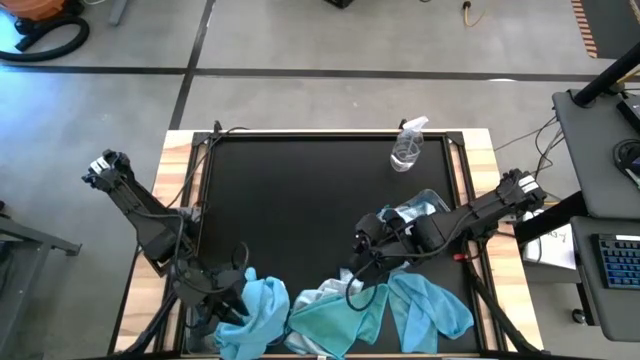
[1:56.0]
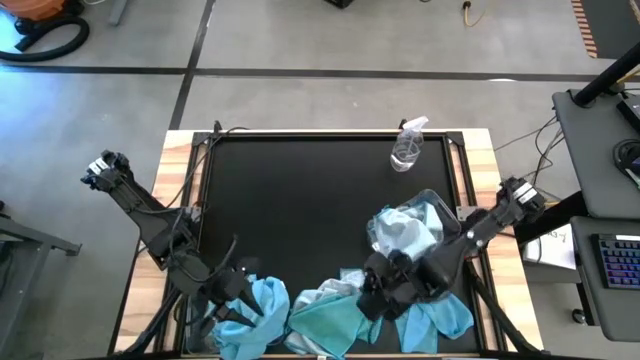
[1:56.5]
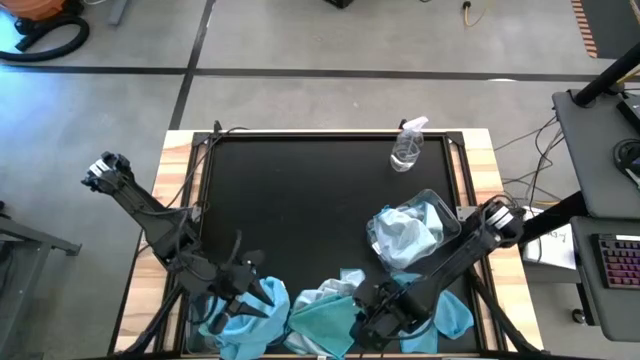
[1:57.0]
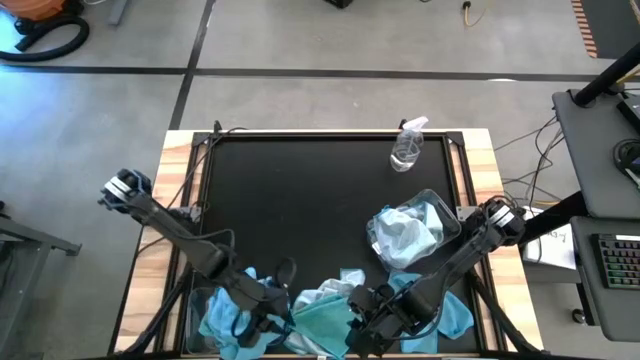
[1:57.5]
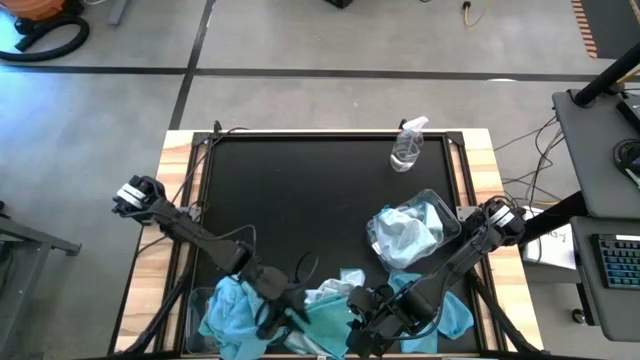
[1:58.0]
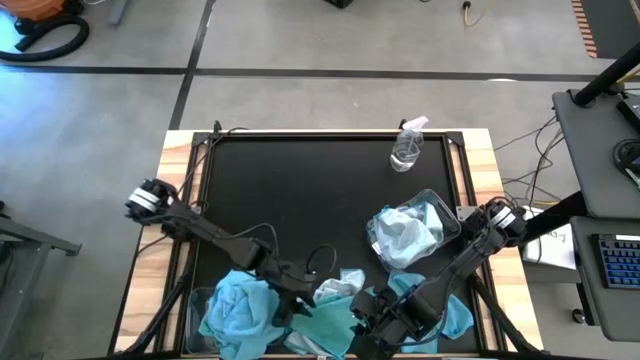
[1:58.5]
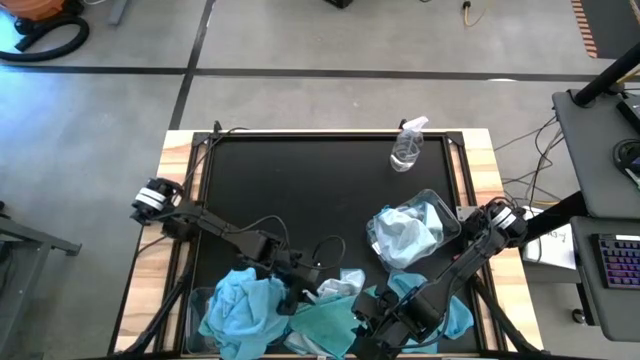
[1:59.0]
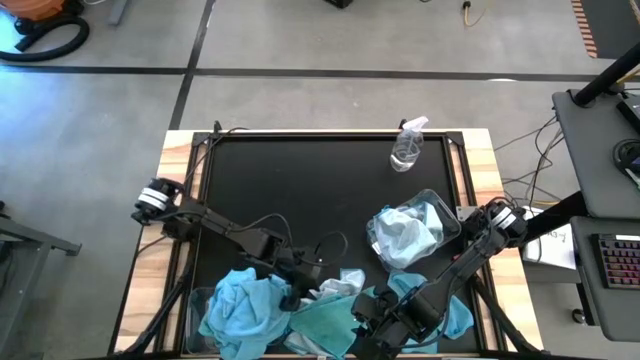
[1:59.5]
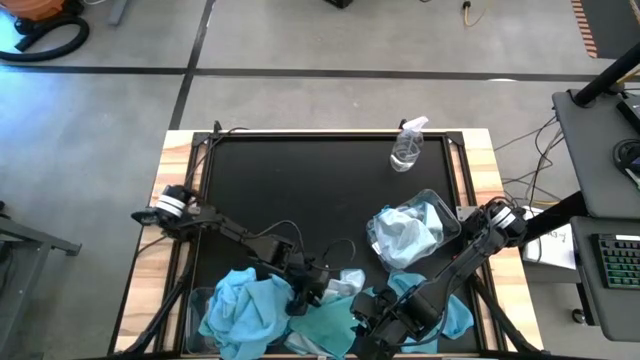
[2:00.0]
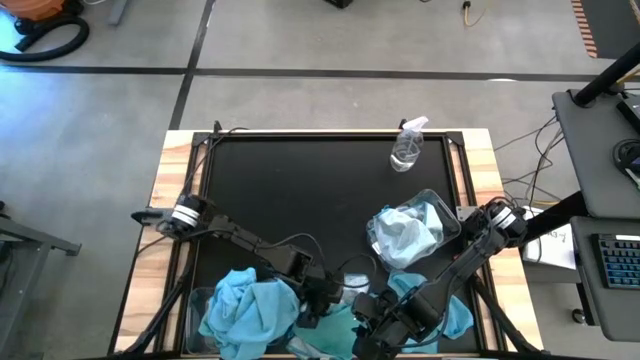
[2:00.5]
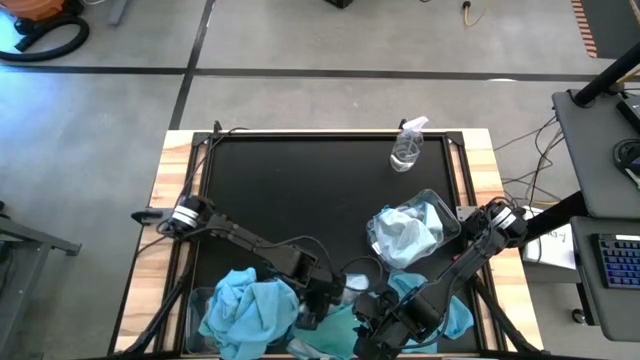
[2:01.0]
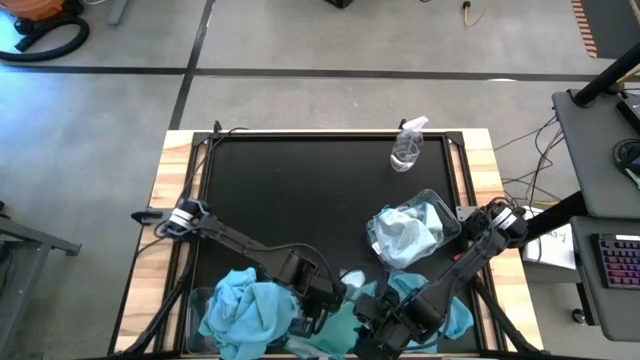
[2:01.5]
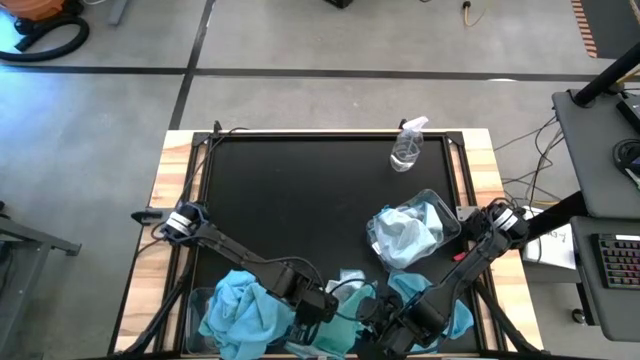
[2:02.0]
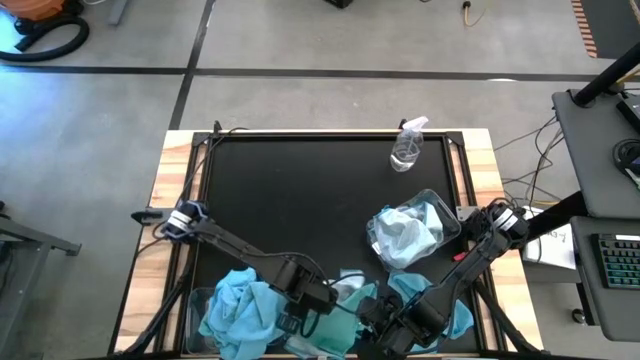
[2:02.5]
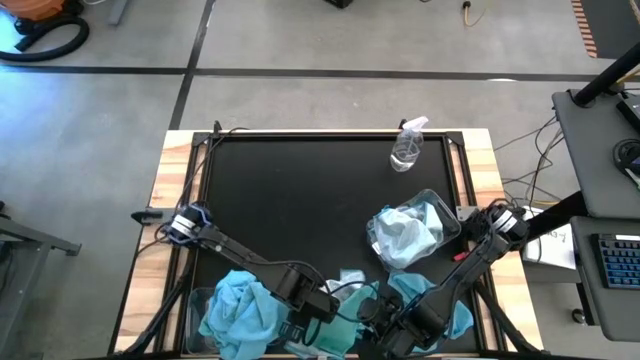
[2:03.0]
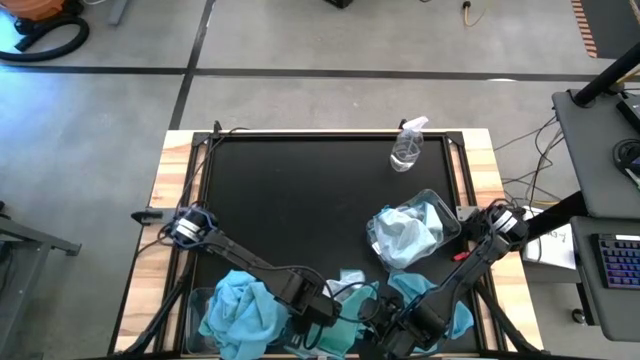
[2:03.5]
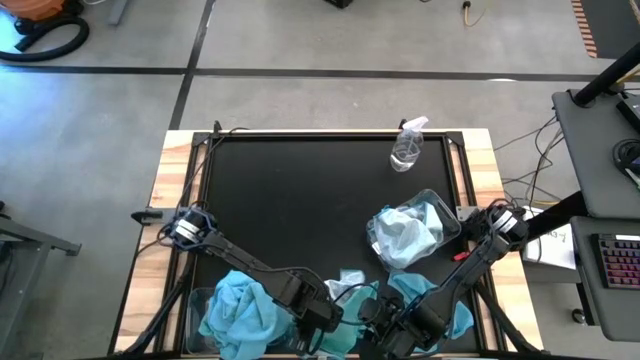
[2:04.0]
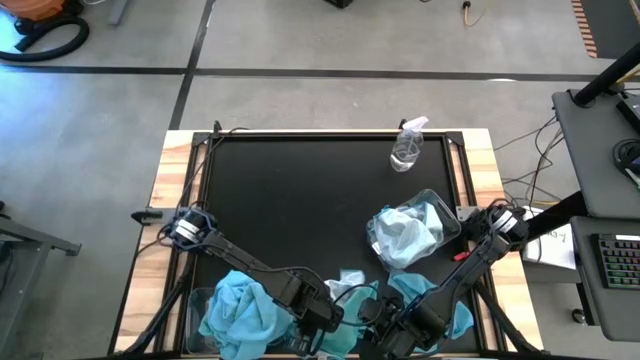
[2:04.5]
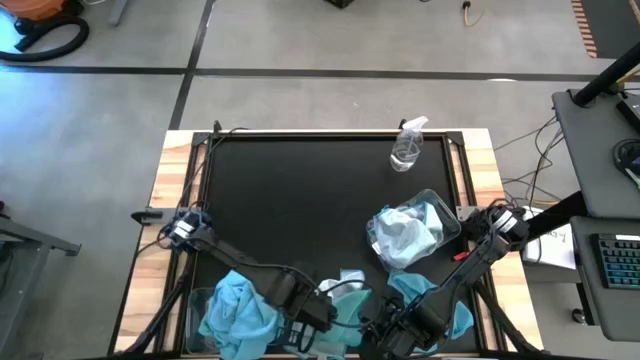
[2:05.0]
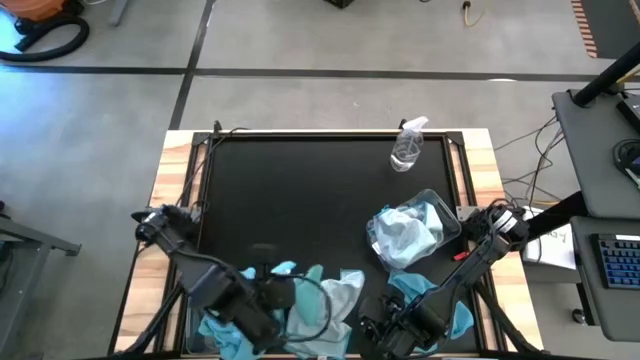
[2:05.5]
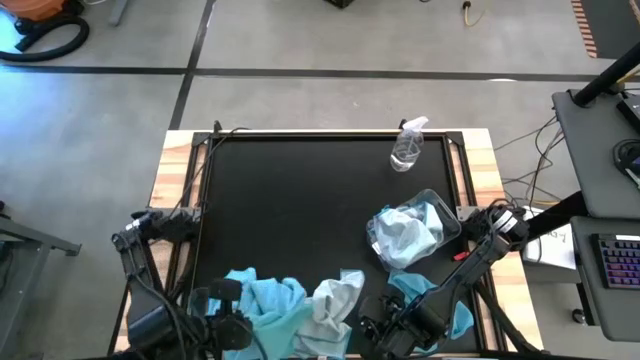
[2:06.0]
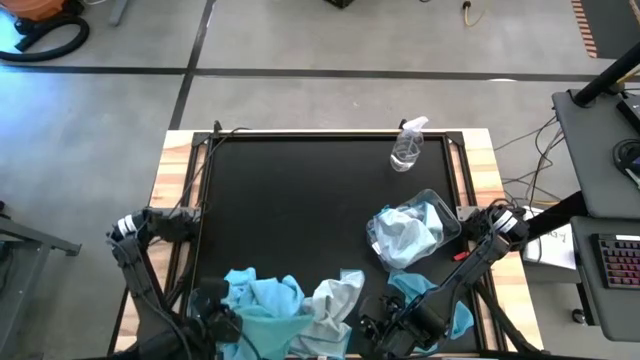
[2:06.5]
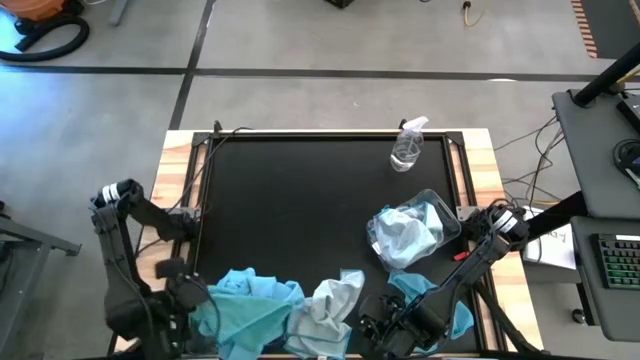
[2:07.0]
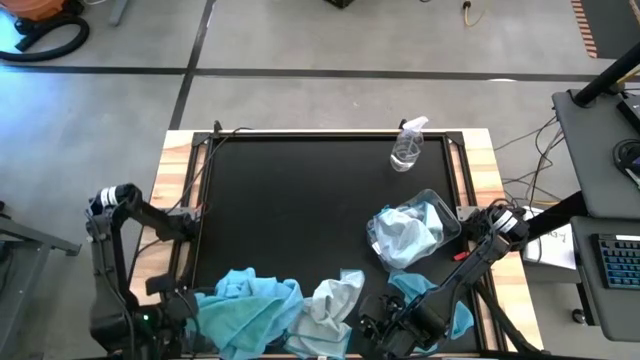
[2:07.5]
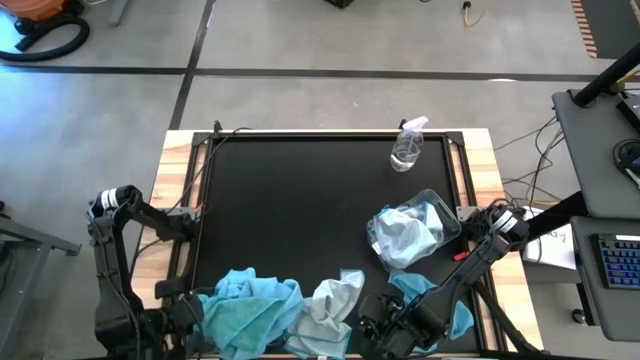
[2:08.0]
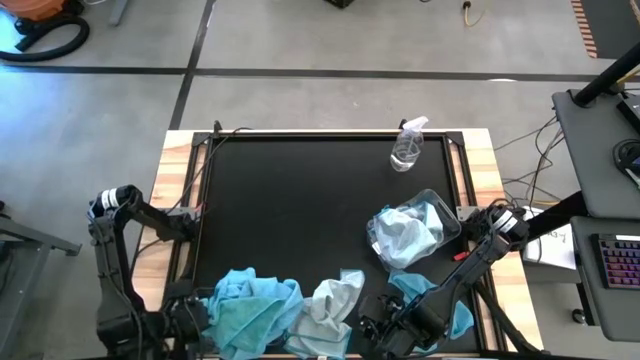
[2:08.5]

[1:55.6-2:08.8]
Task: Sort microfiber towel by color & place in baskets
Put the blue towel into the bottom transparent bin

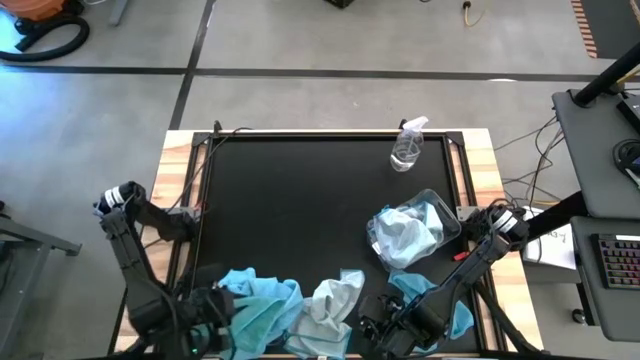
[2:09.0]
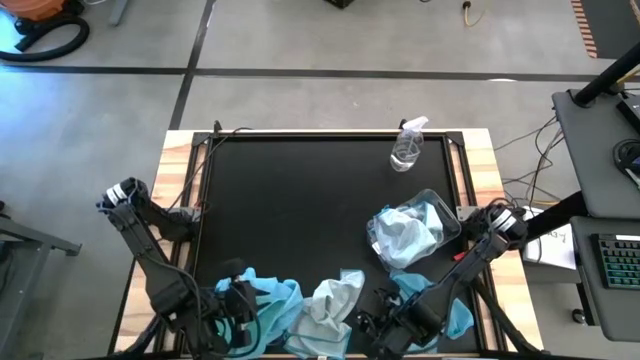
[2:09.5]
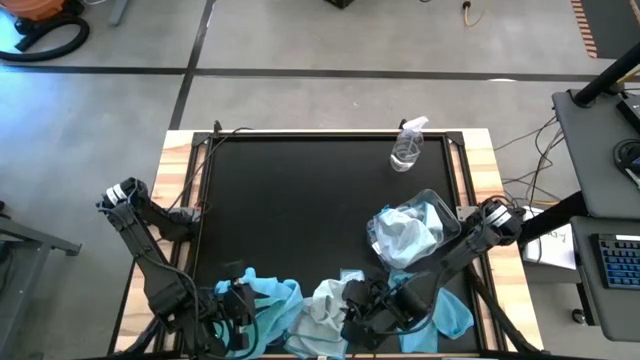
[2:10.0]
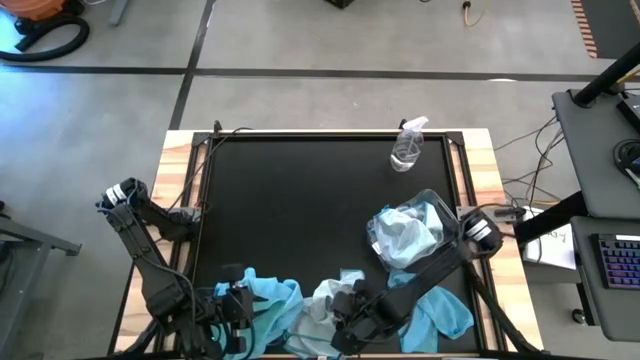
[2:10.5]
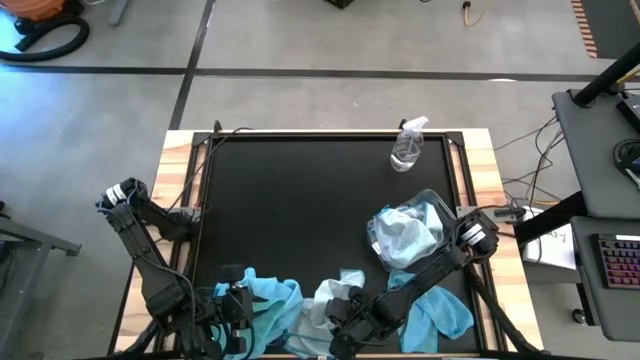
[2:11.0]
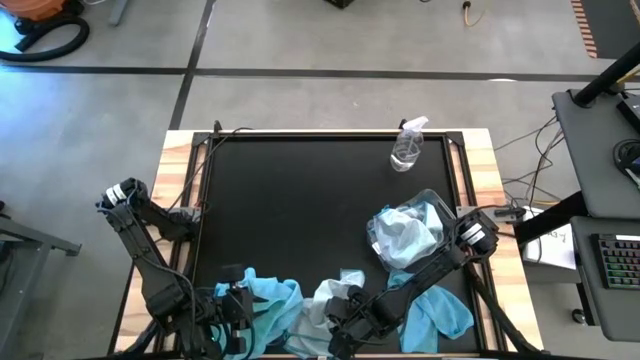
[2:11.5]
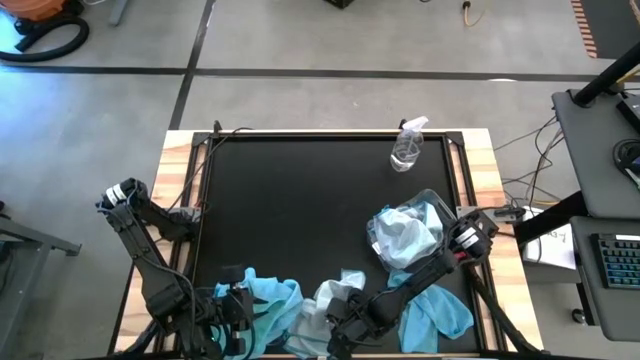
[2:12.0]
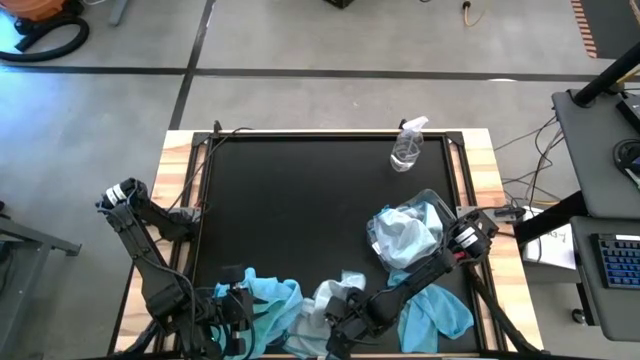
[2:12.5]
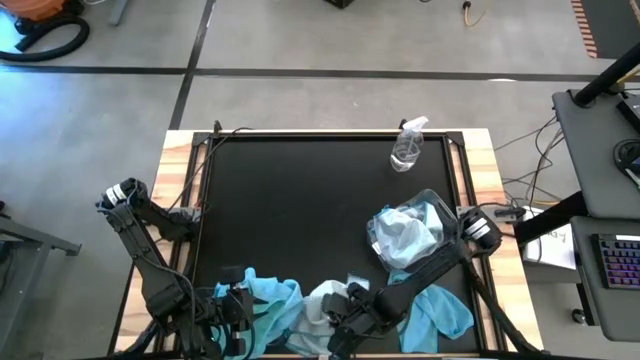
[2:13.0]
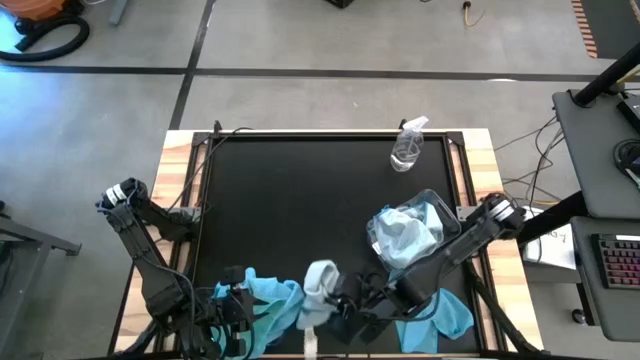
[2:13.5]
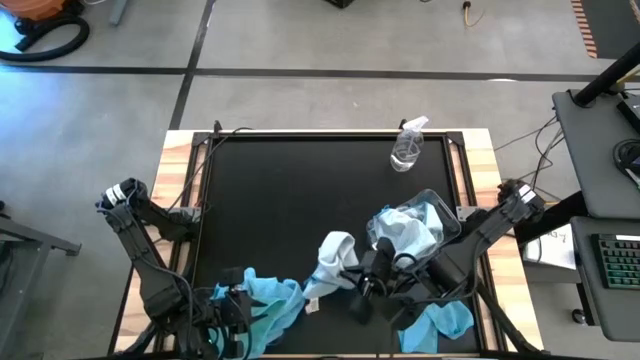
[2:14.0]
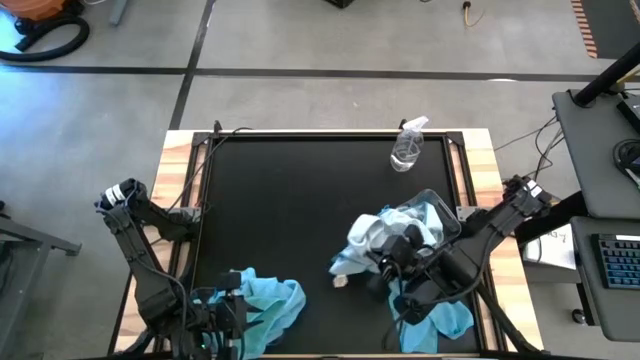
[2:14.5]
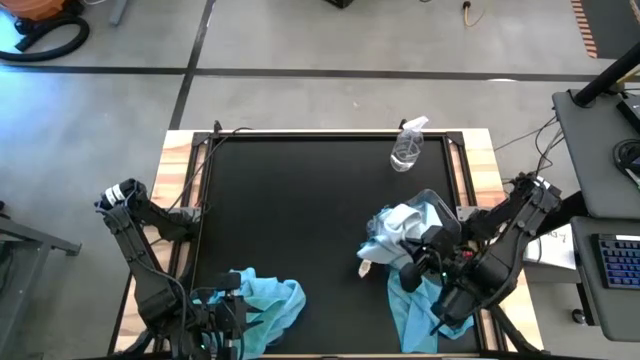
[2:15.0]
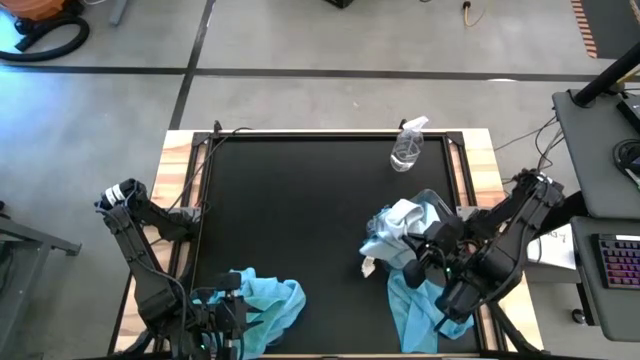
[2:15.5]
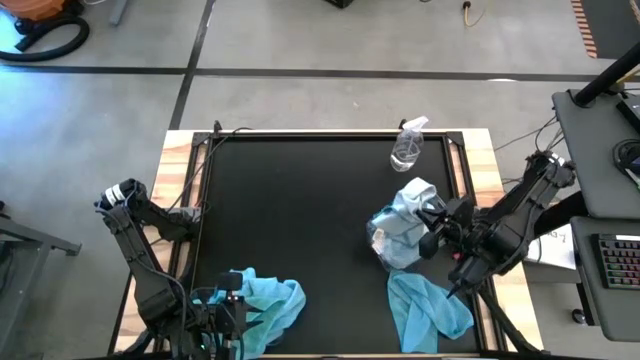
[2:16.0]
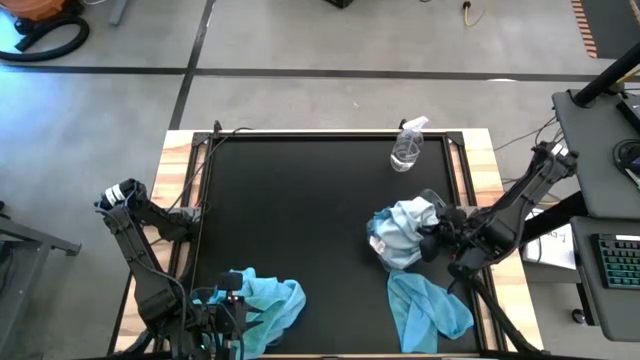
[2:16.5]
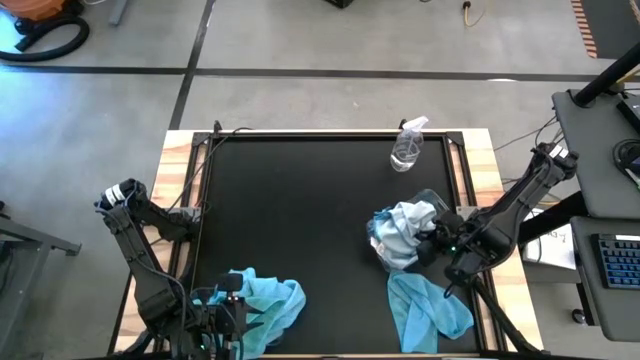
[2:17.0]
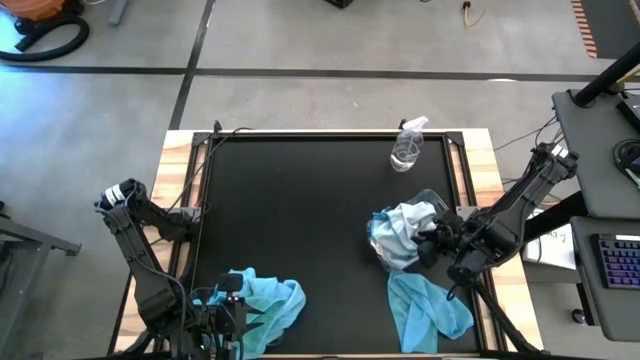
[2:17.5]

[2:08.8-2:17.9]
Put the white towel into the top transparent bin
